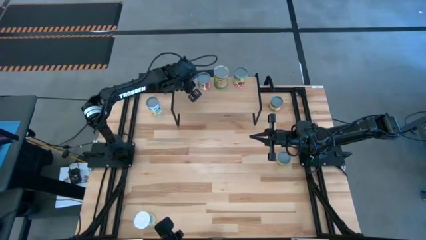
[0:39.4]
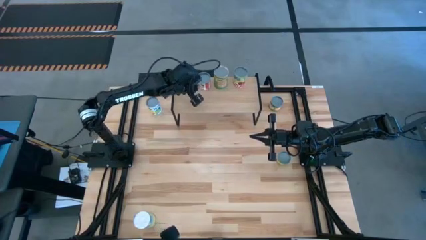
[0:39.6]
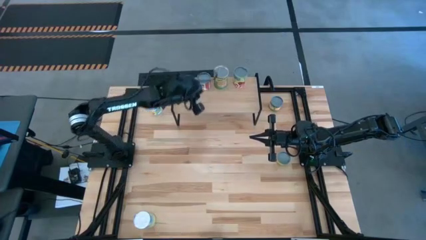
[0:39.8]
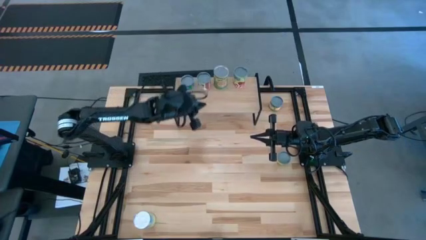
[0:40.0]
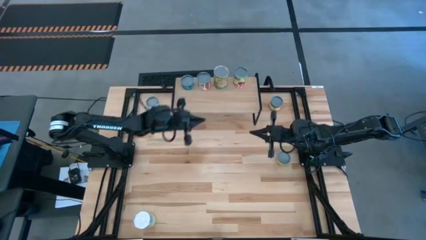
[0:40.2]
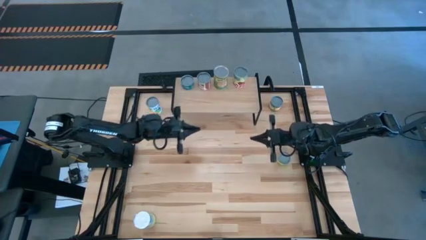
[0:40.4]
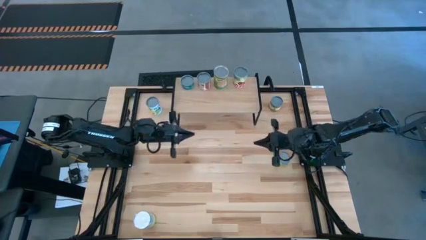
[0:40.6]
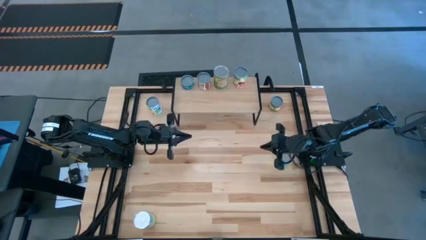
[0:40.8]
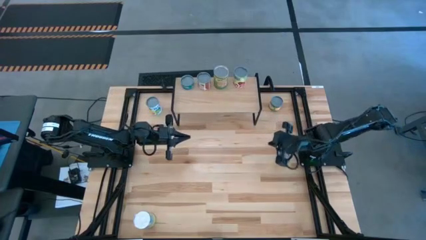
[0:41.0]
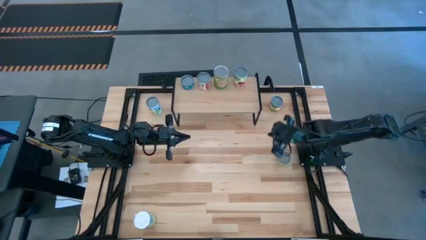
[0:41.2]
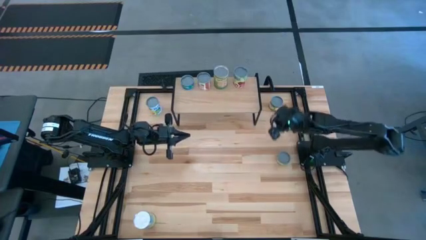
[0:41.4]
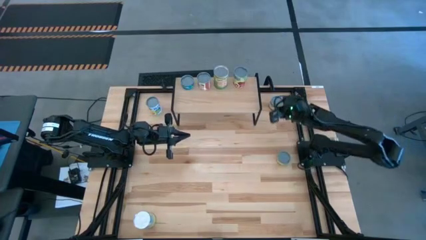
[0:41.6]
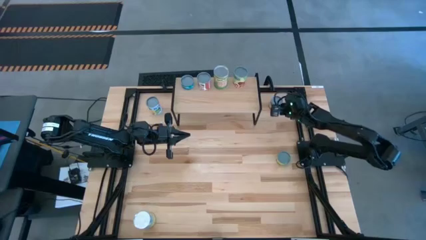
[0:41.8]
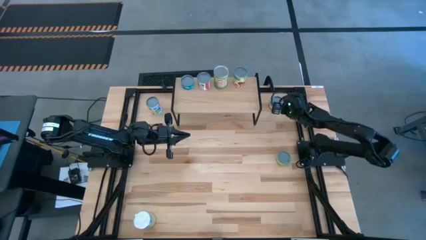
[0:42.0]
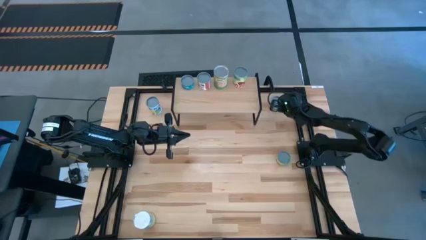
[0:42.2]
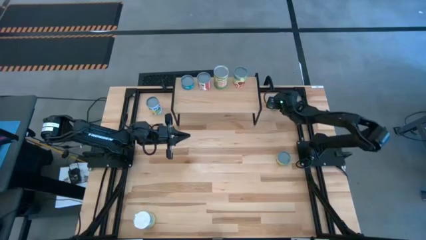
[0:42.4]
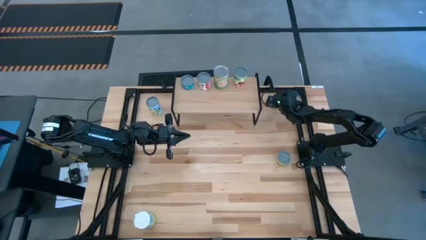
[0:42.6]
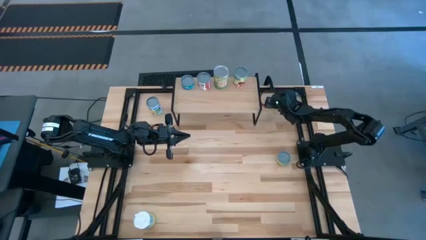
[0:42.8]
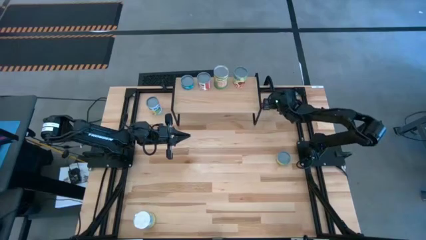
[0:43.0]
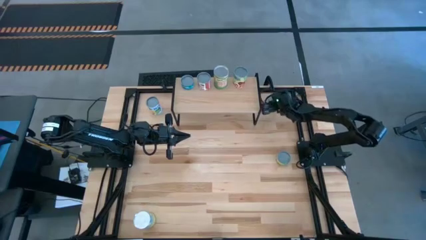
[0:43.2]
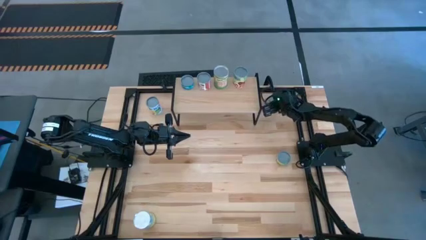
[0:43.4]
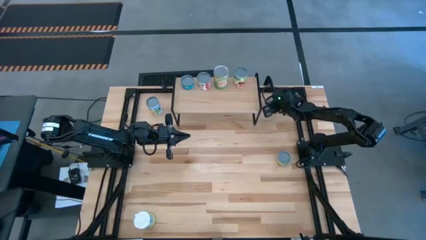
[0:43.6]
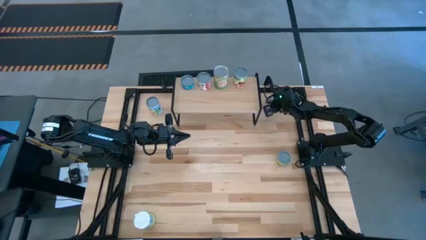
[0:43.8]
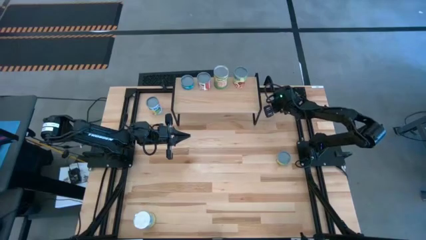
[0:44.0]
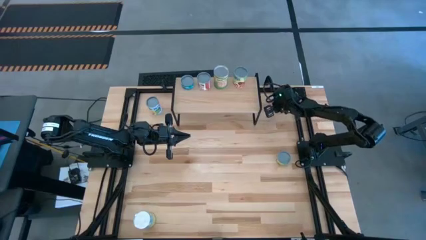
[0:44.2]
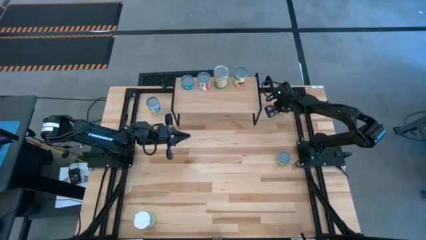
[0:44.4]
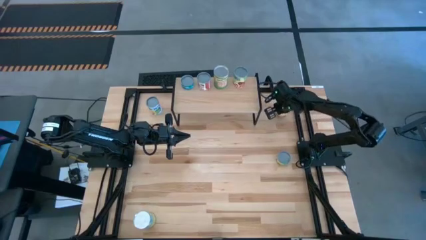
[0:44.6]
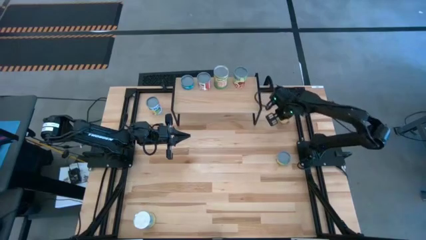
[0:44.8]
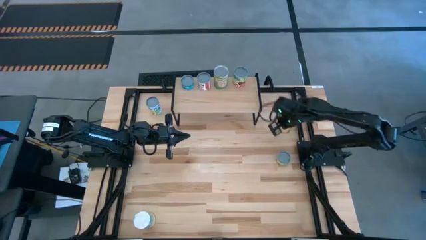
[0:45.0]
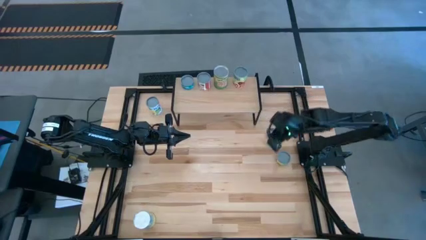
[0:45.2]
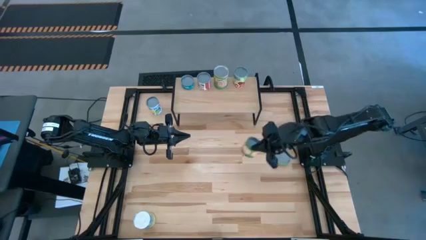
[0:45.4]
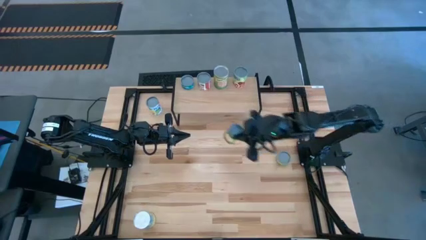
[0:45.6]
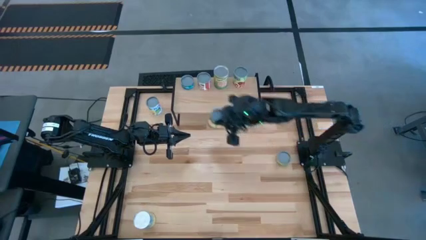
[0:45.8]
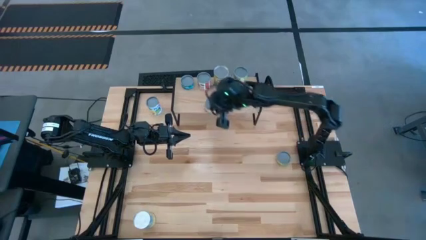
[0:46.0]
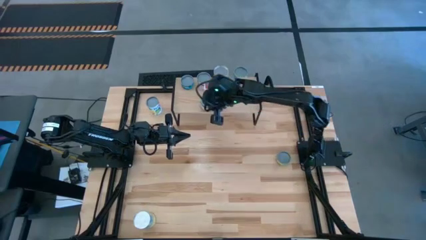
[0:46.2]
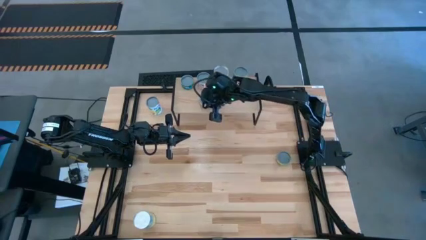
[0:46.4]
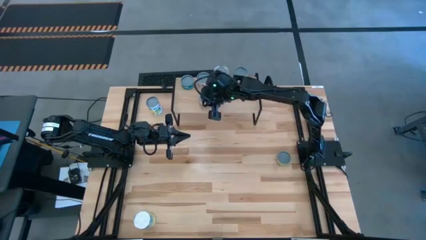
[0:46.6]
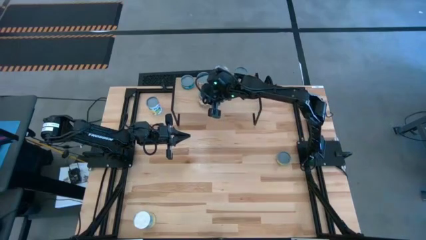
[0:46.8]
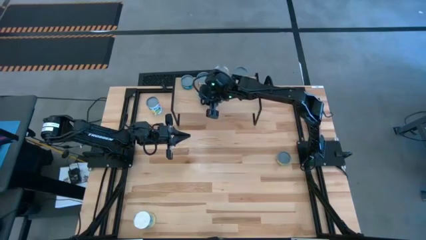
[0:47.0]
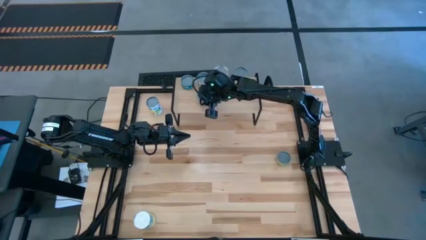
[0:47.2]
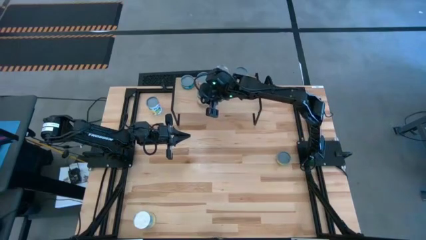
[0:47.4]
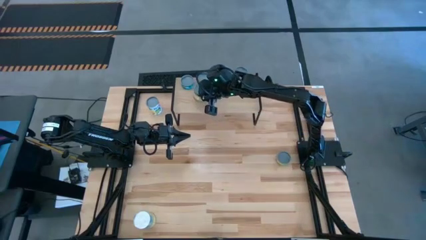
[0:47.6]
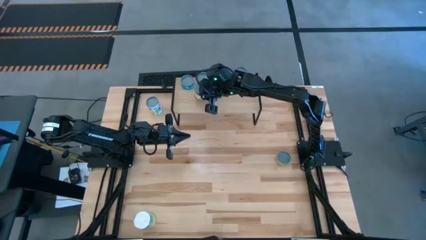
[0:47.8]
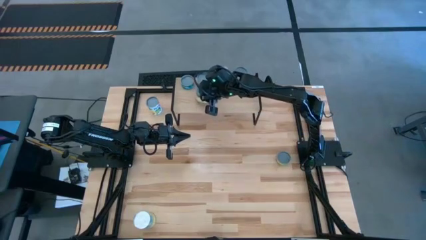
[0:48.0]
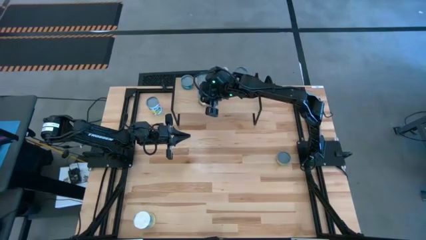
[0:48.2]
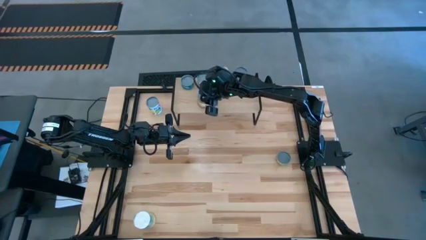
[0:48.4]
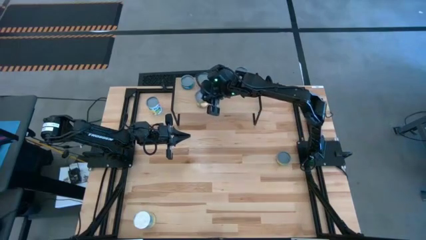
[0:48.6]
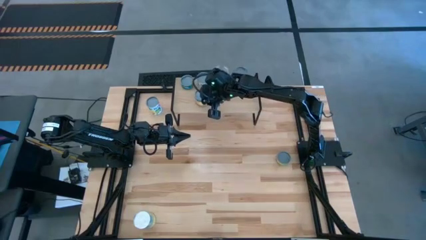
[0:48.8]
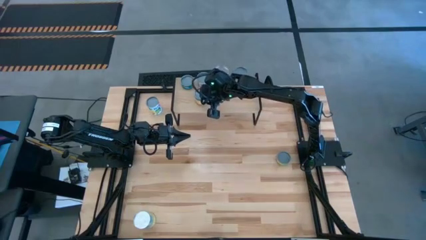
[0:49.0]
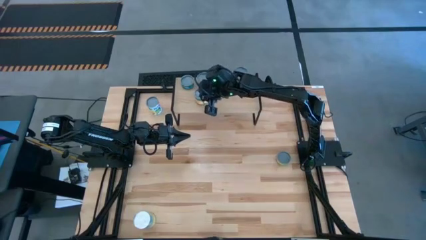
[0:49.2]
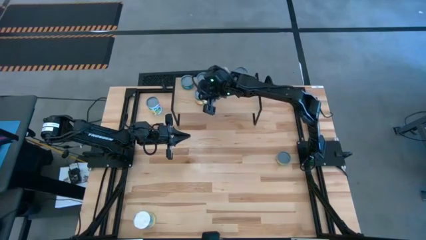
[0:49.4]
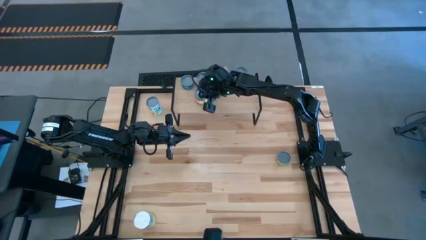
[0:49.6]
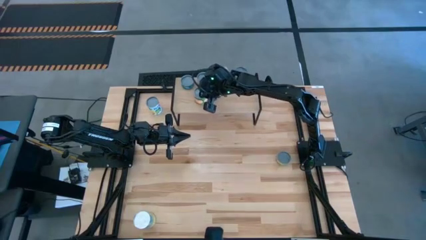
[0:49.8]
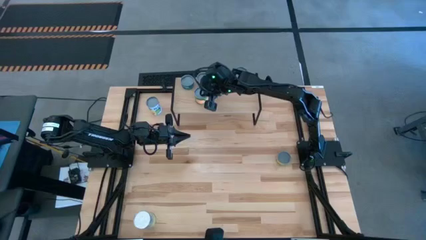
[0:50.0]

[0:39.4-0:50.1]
Task: Pick and place cans onto a shelf
Put the canned peaches on the shelf

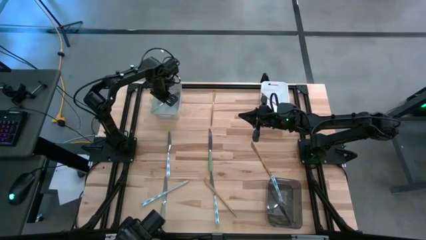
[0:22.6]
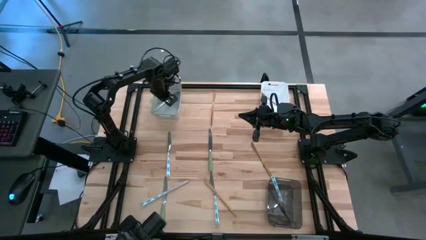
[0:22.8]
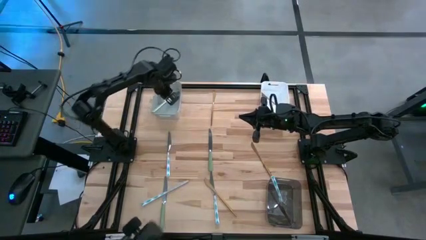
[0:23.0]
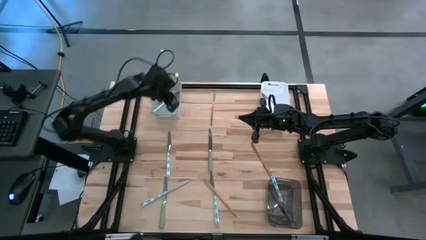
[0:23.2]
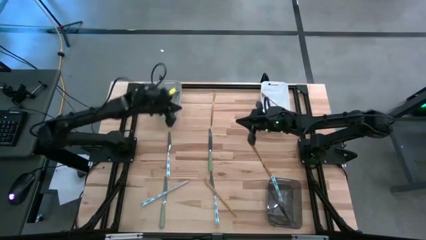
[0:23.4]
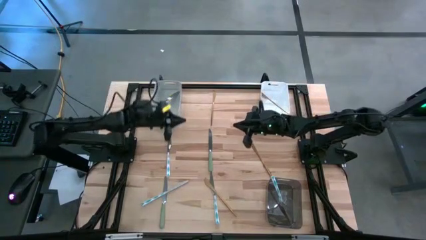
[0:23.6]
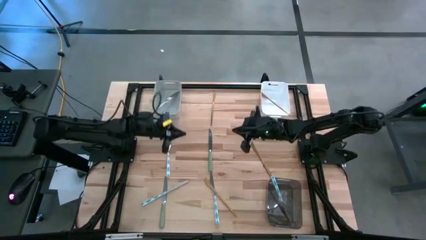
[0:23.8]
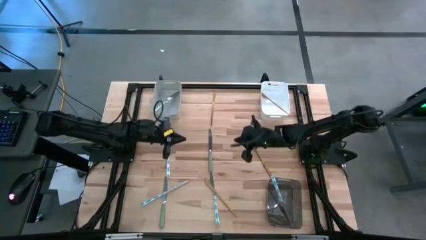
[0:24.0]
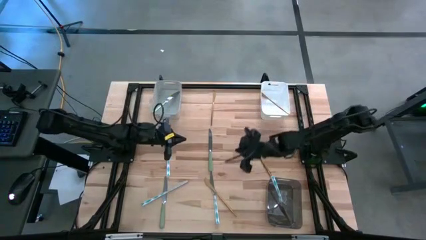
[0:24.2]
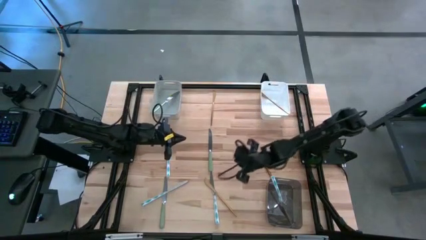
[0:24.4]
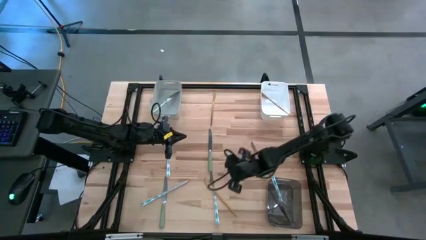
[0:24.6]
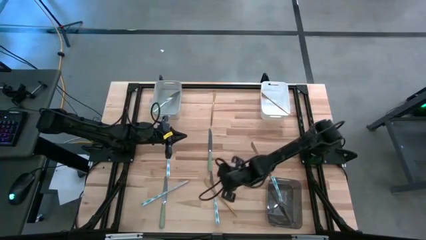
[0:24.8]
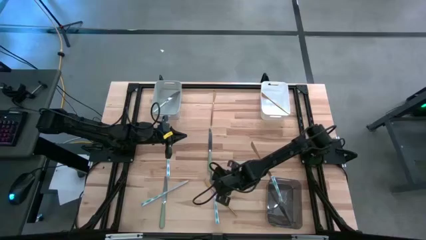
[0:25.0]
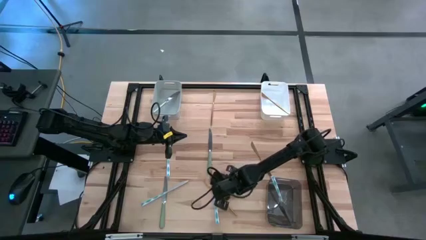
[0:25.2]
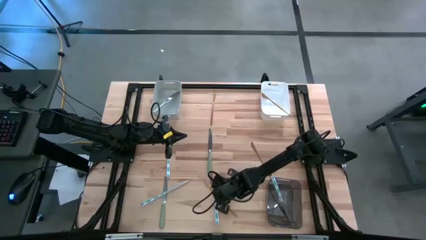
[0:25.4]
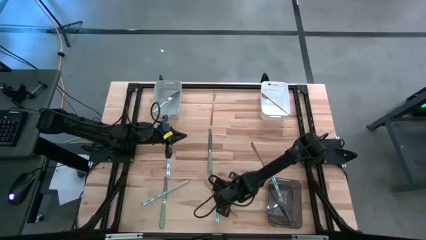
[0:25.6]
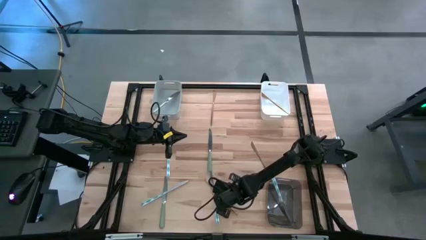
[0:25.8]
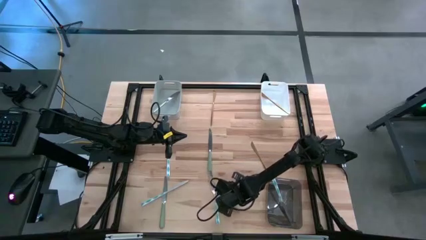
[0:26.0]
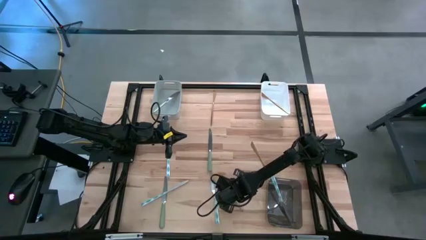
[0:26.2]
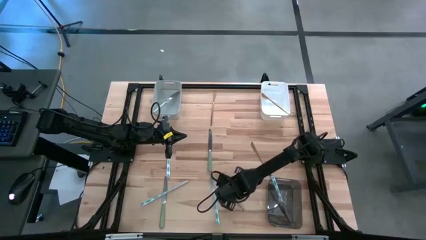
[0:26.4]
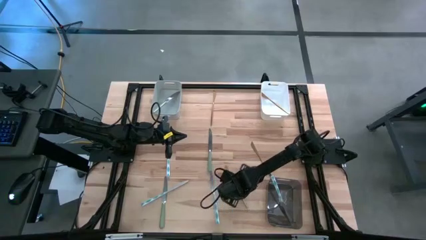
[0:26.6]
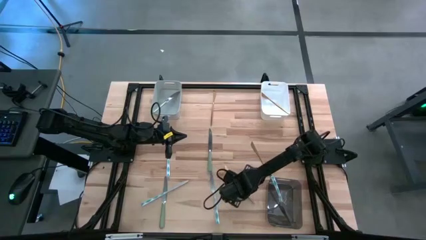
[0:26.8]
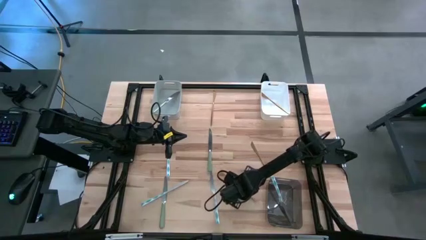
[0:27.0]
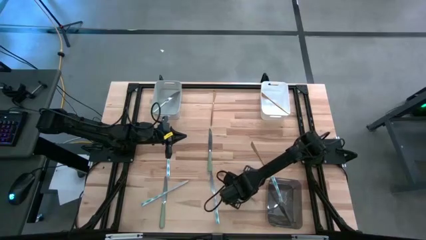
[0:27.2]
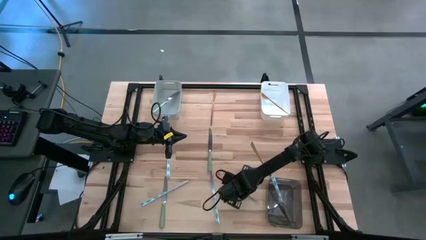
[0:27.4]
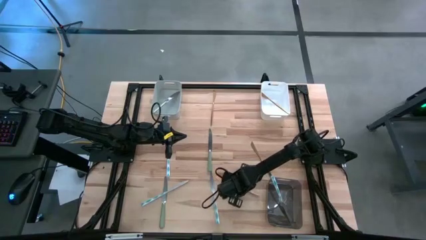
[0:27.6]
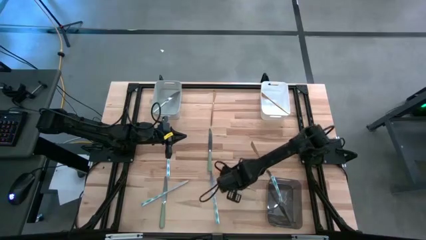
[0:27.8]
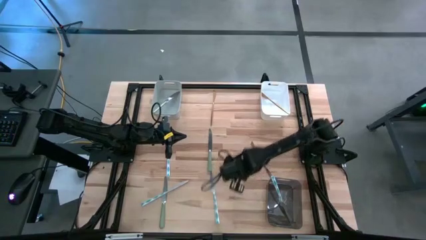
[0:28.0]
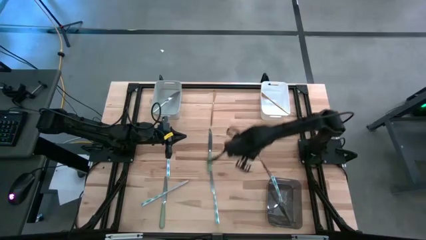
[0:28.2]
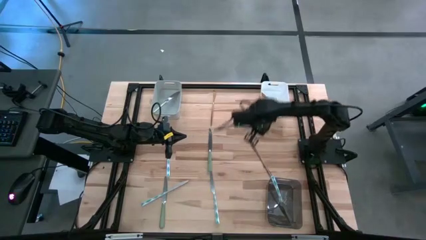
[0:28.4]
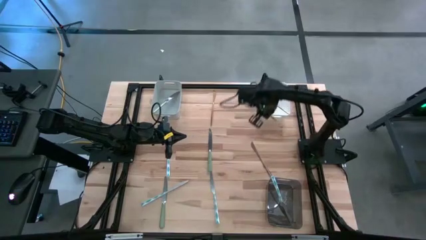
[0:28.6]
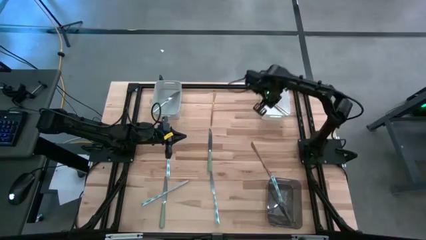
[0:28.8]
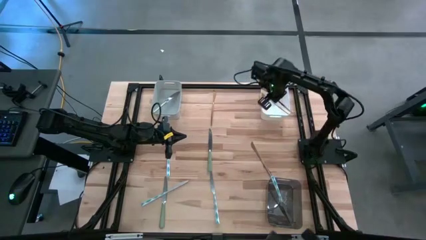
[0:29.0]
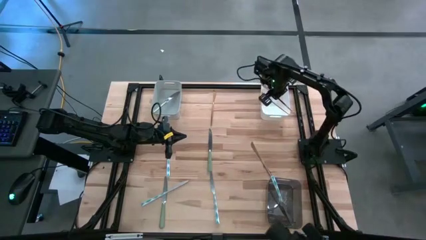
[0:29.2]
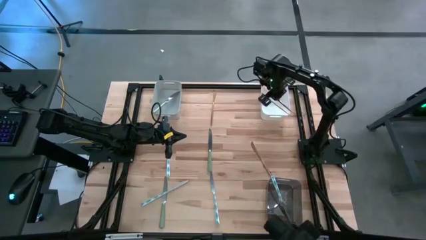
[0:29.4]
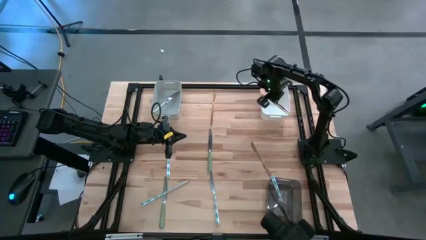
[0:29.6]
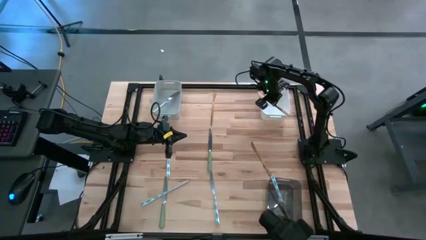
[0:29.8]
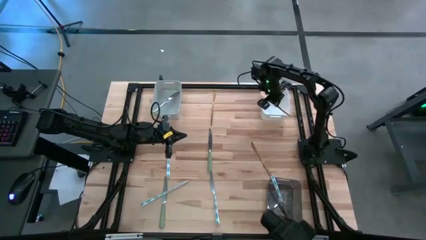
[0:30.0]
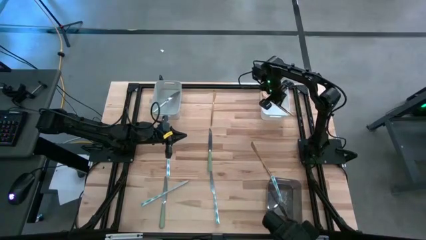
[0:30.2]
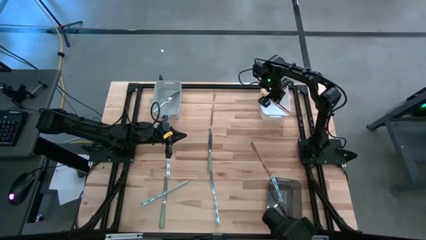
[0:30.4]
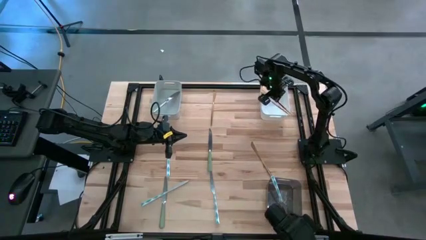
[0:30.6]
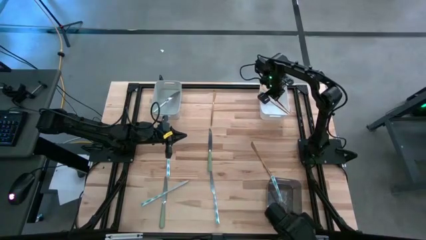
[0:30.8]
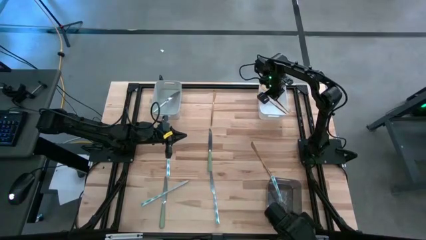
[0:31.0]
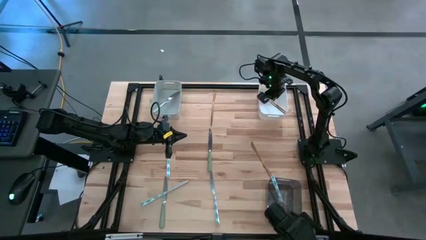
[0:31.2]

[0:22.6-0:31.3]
Task: Sort silverware by color (type)
Put the bottom left golden knife into the white bin
